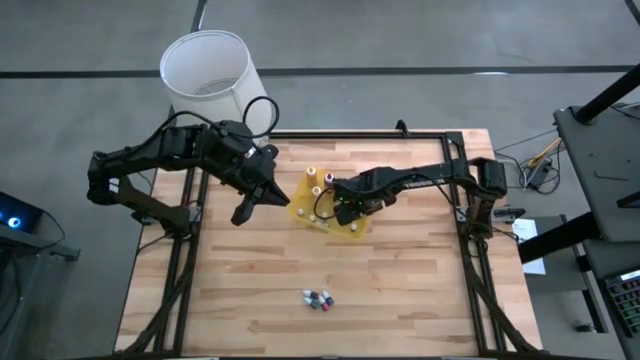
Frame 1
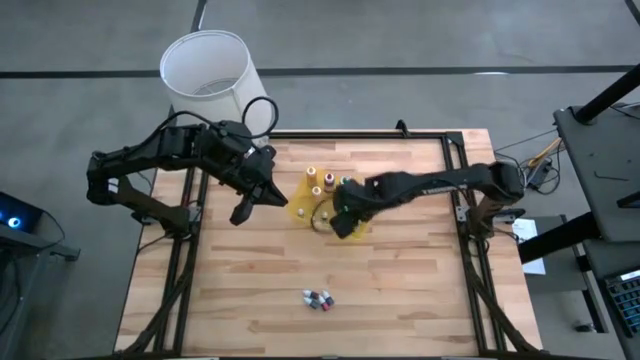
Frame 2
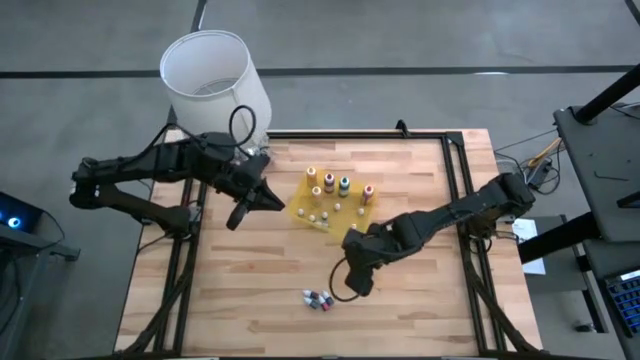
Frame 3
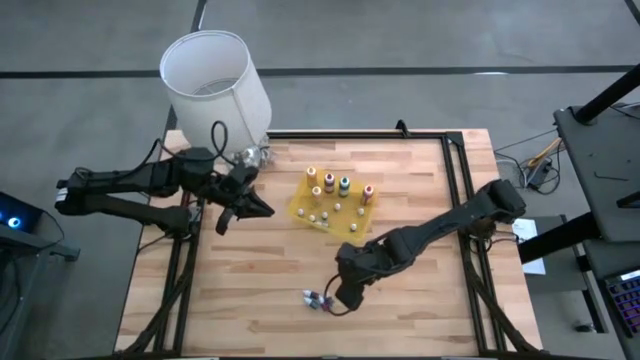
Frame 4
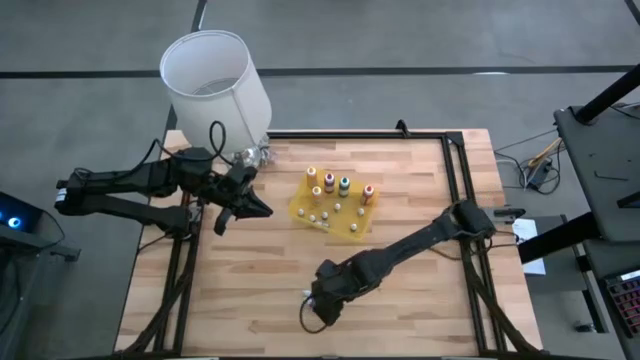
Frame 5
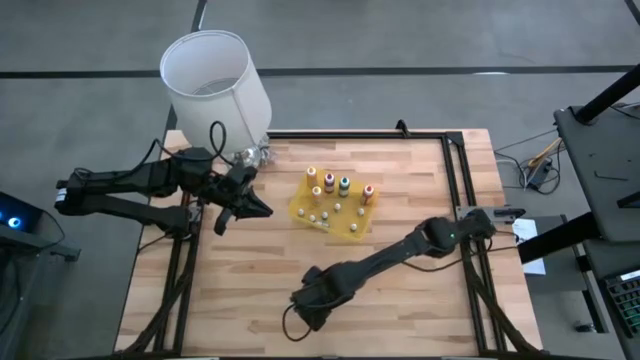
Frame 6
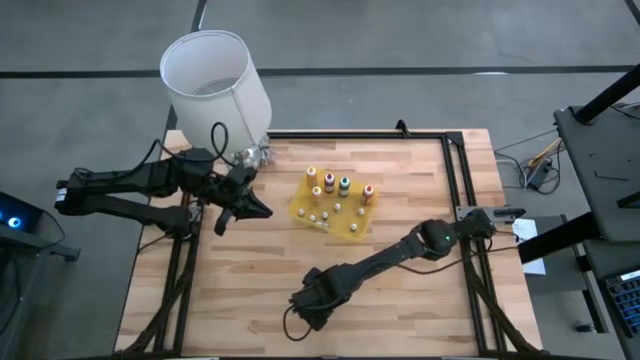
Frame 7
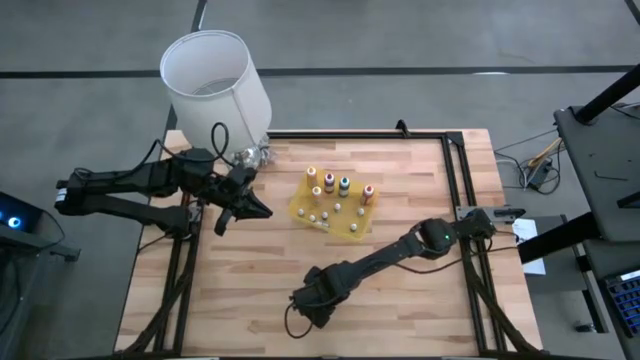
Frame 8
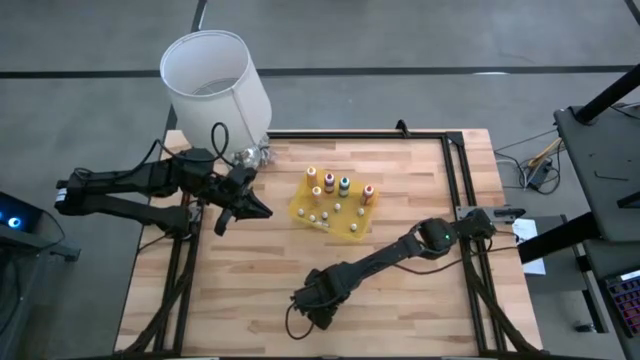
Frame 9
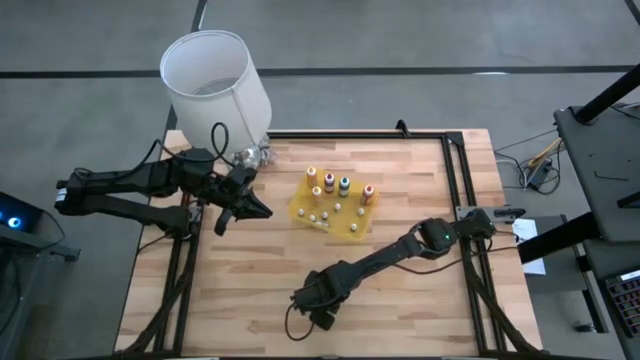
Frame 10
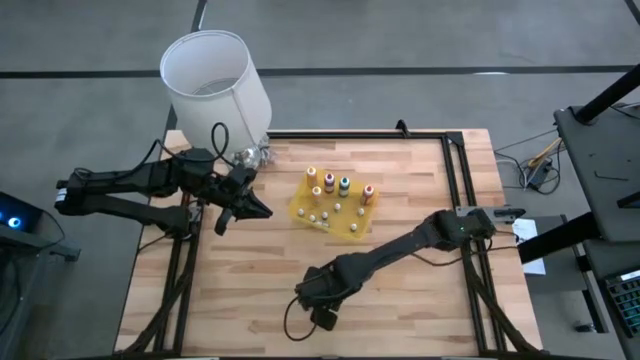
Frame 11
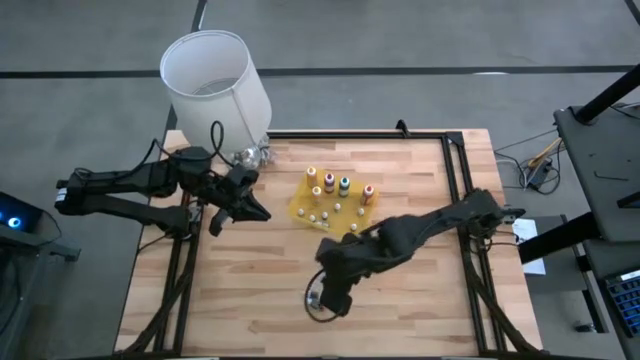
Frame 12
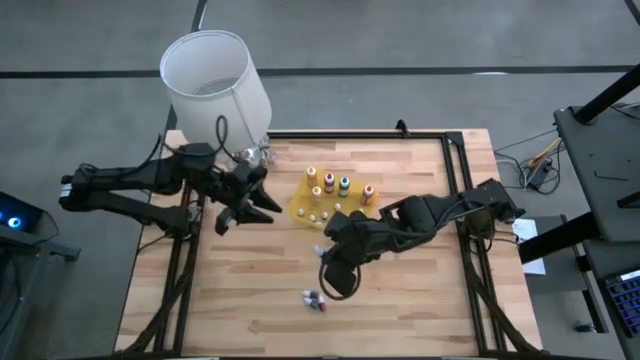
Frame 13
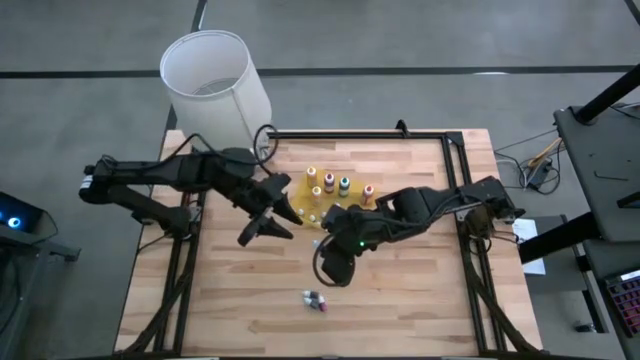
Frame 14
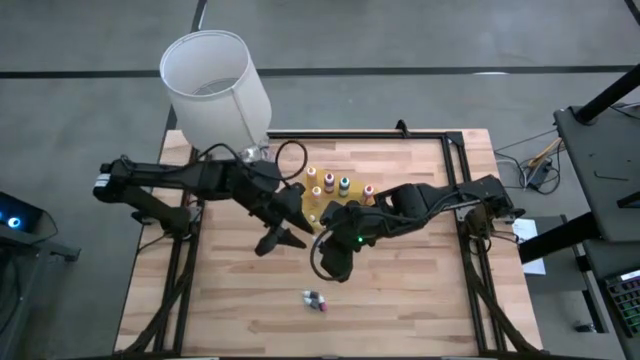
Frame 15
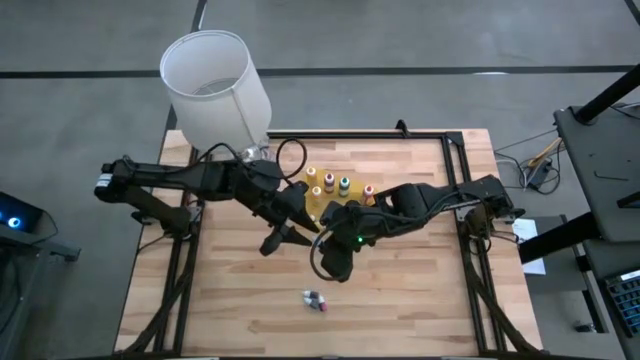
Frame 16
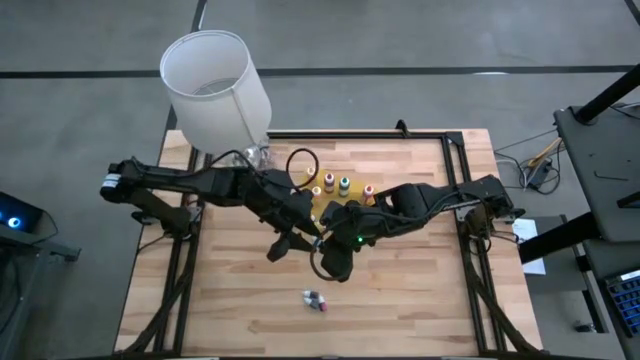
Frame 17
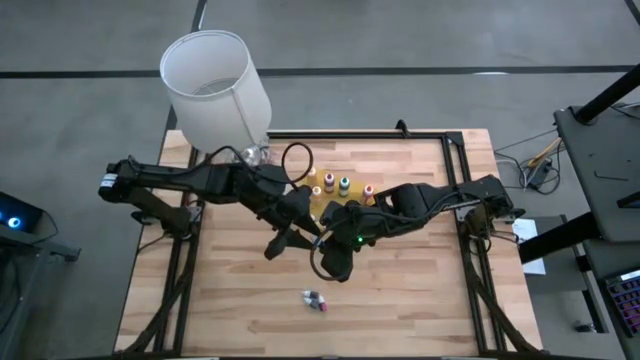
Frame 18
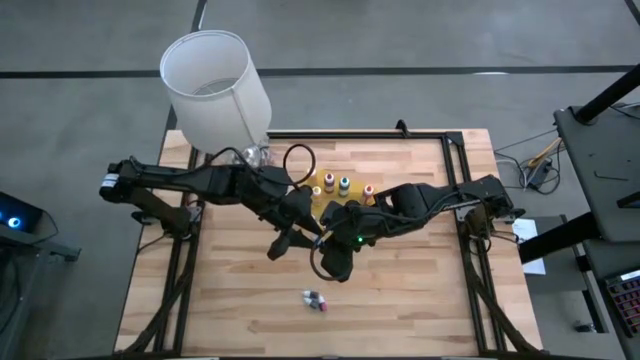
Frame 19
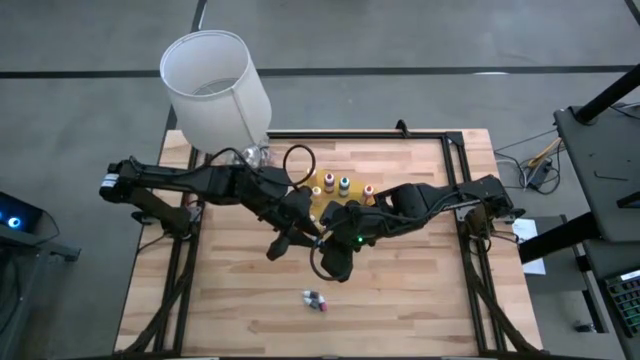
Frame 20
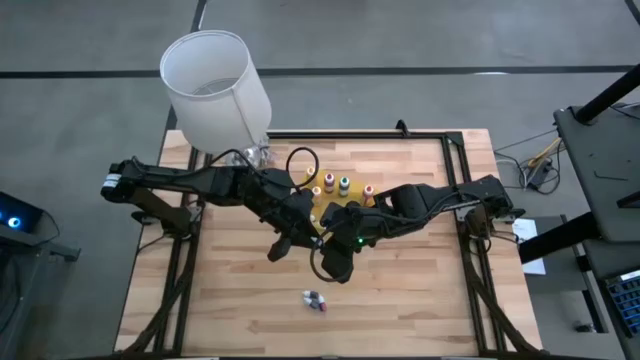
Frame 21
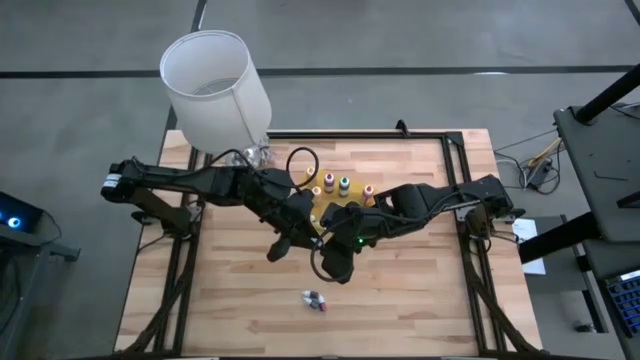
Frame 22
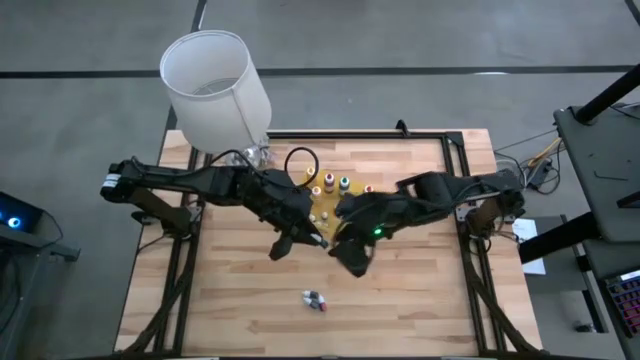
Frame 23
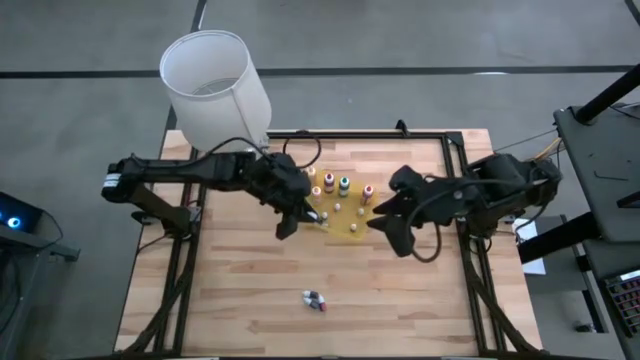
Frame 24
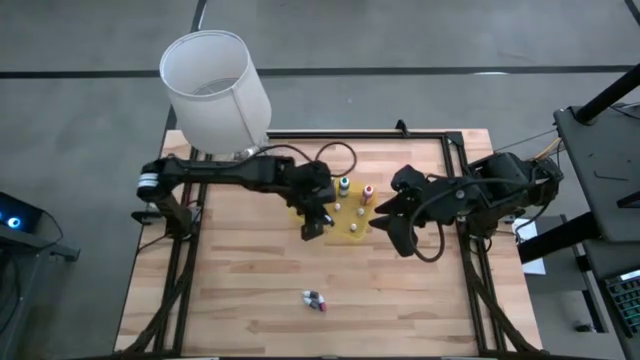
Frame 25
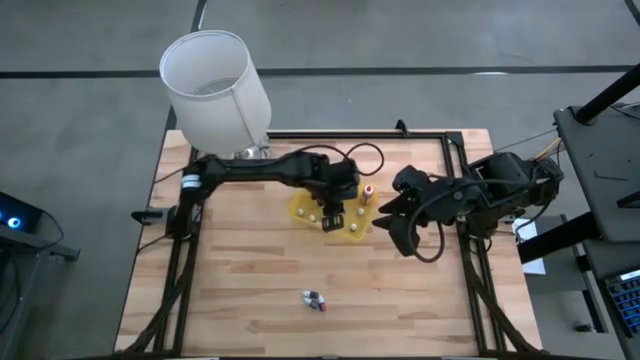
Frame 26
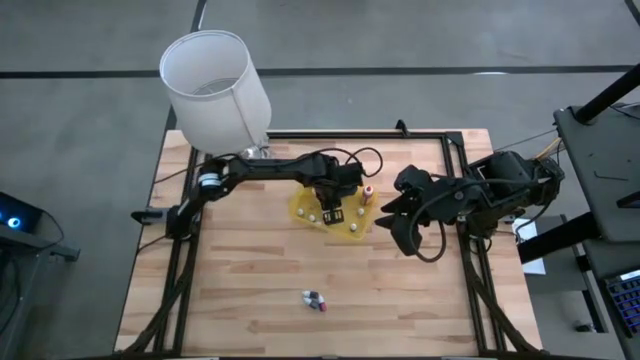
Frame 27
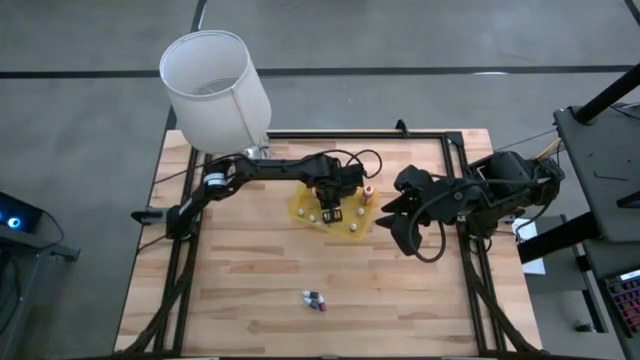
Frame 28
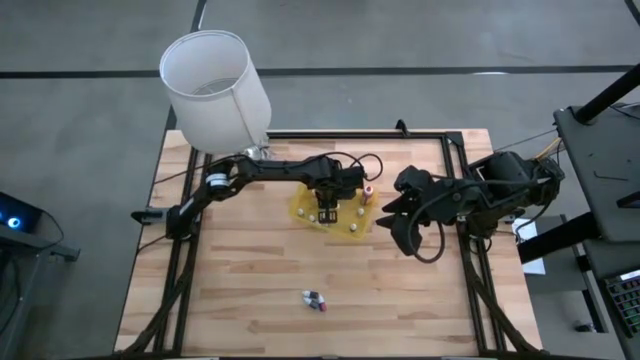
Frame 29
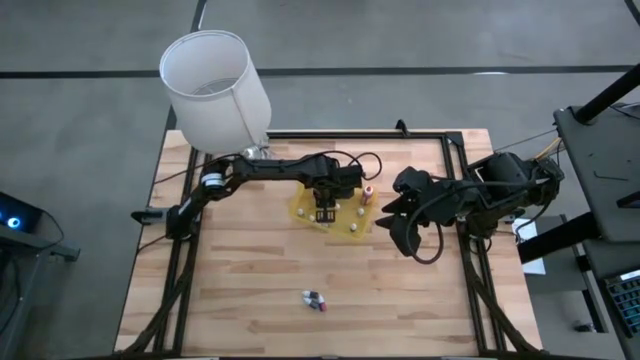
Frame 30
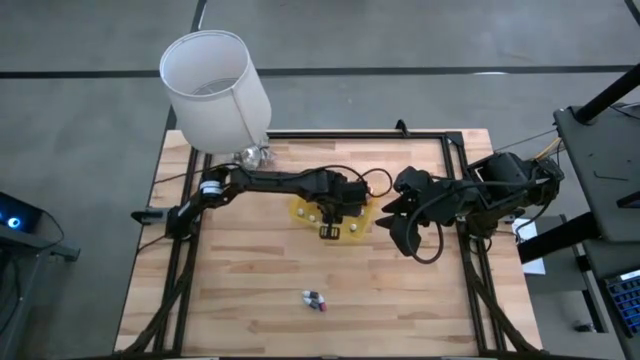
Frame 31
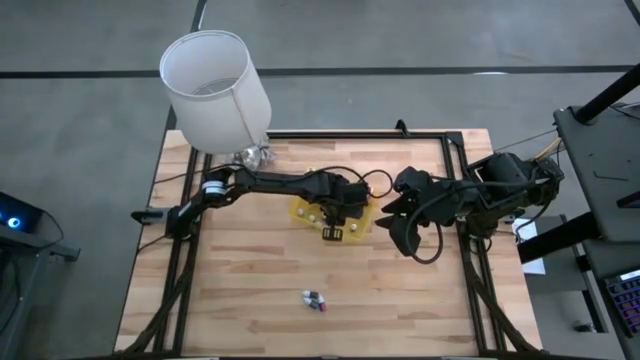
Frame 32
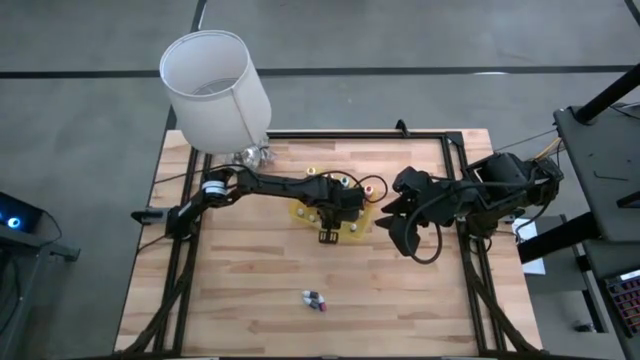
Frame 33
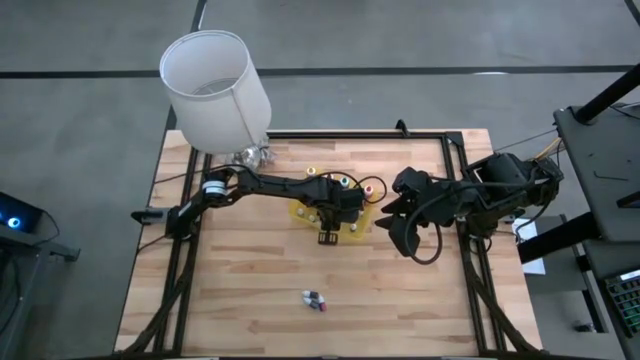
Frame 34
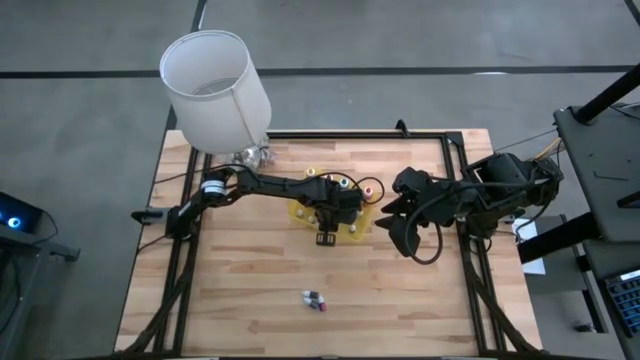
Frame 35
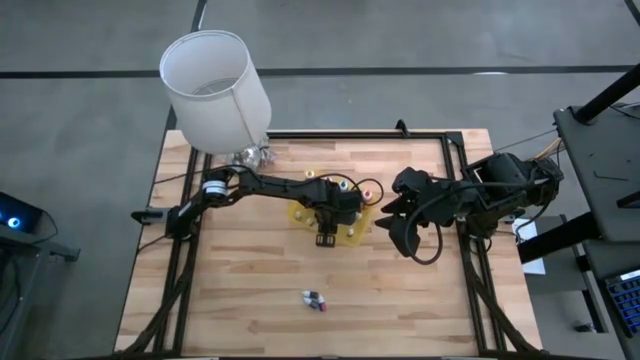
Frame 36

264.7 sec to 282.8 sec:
Task: Pick & Place food coloring
Put the small green food coloring bottle into the yellow bin

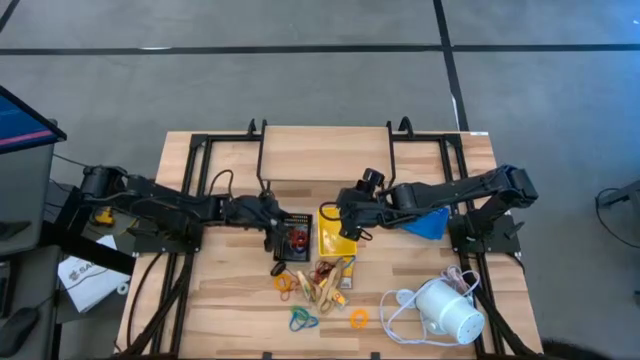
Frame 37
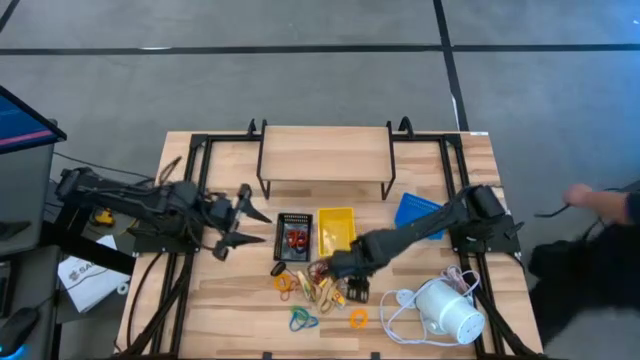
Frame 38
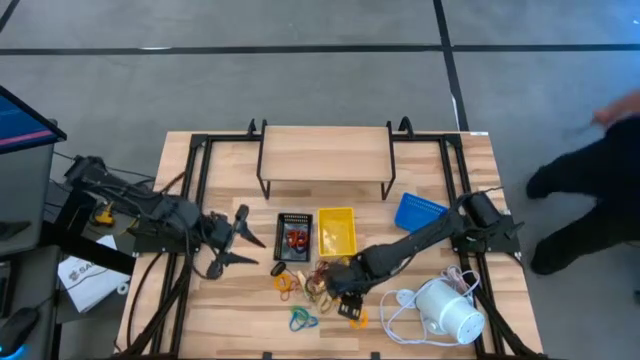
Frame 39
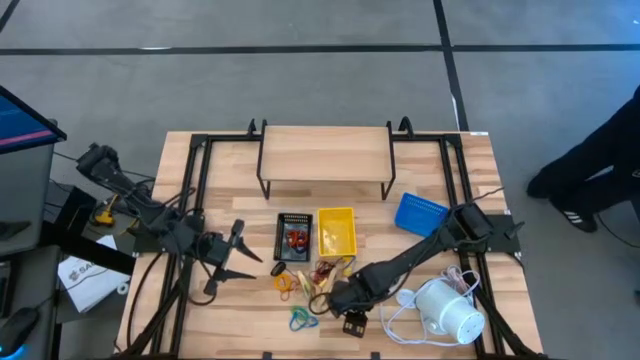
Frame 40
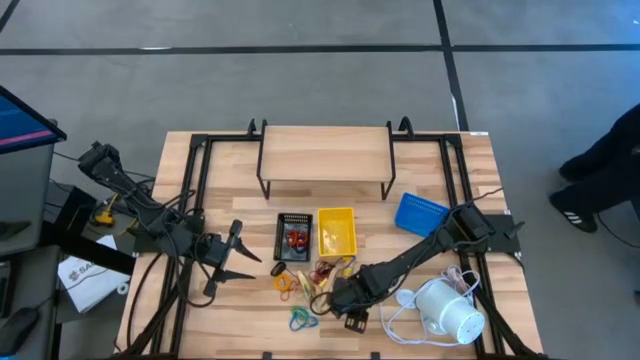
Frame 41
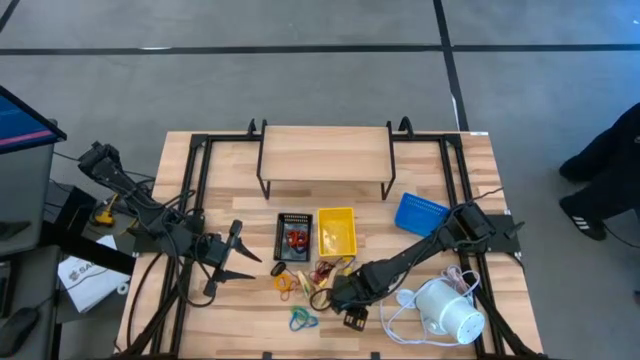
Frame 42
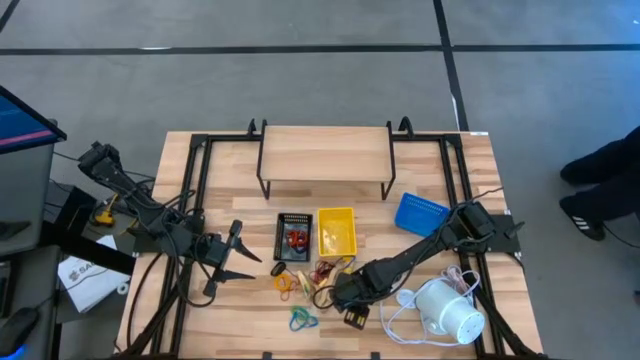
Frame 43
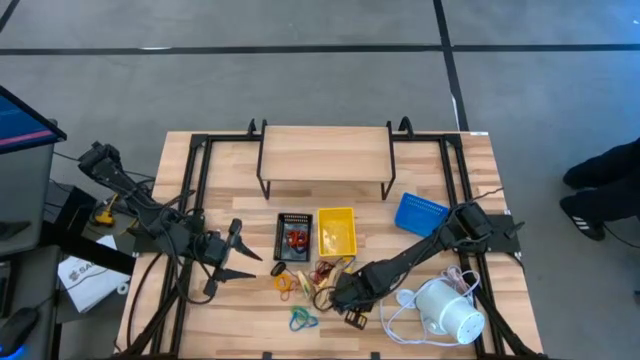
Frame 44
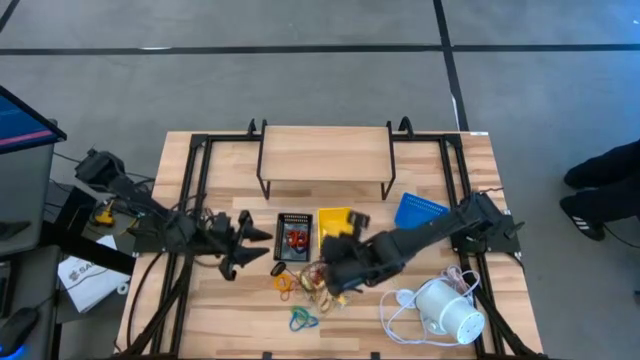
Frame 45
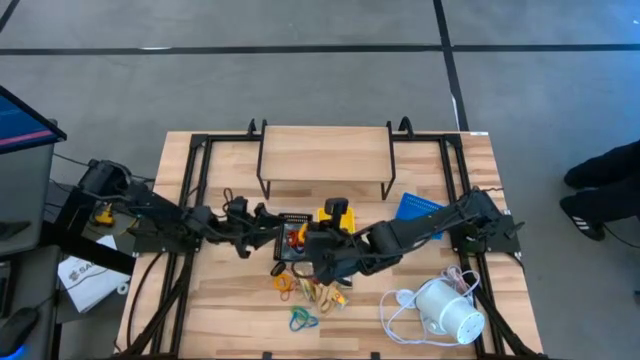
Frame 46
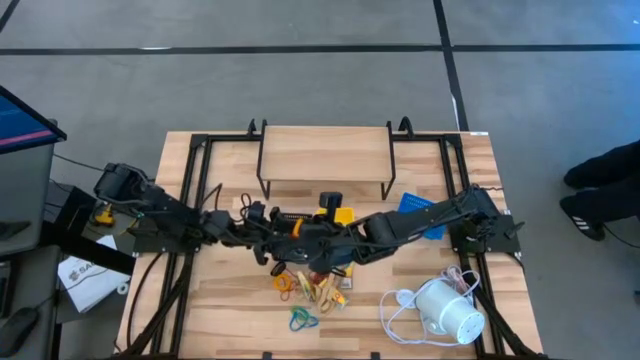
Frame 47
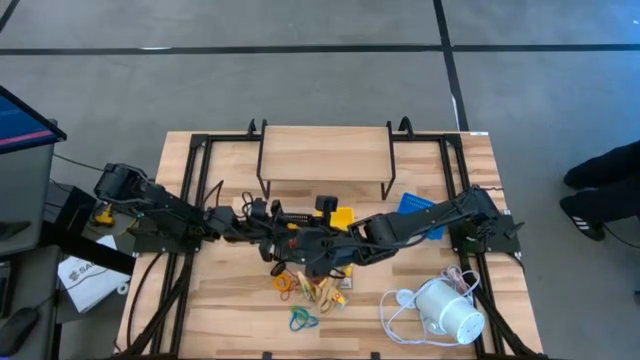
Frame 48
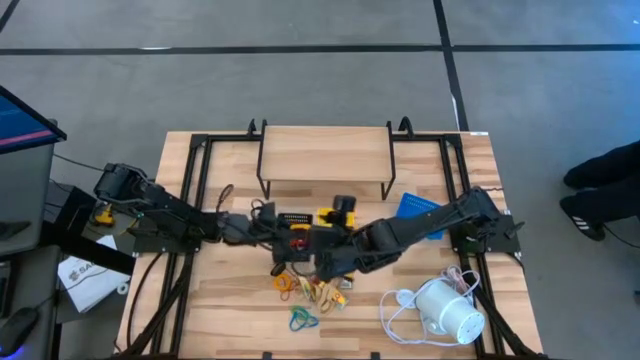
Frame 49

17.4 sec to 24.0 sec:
Task: Pick & Place Office Desk Supplies
Put the yellow spring keychain into the black bin
